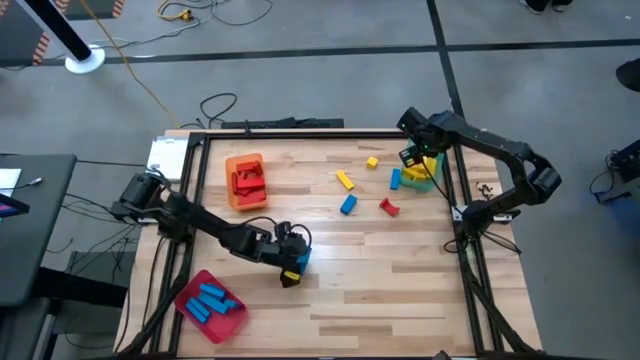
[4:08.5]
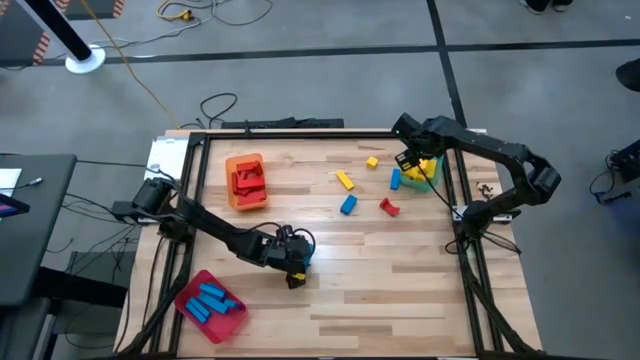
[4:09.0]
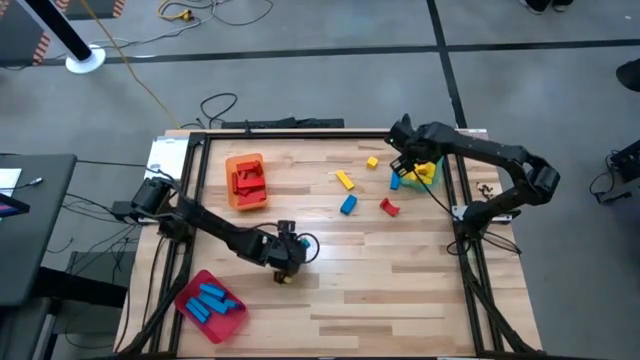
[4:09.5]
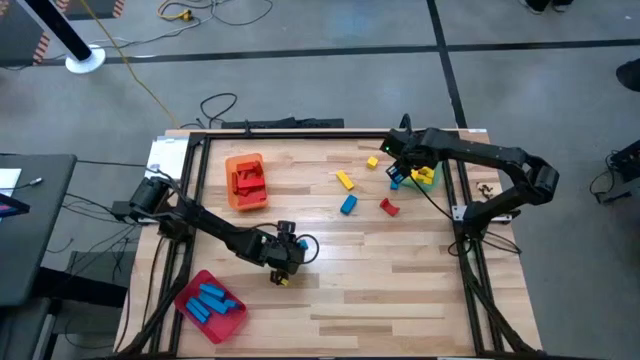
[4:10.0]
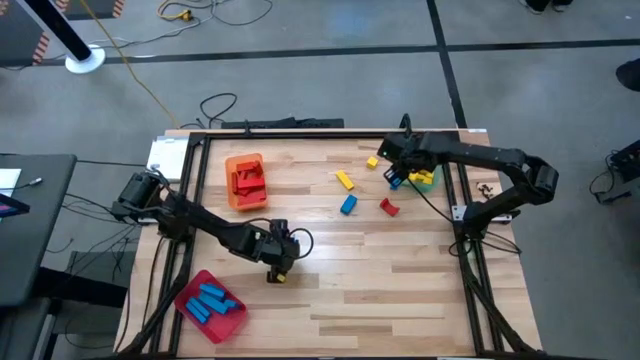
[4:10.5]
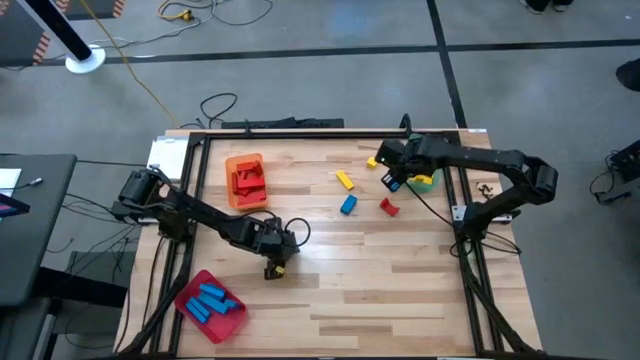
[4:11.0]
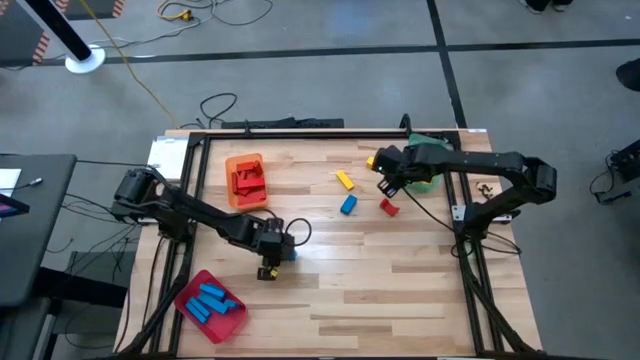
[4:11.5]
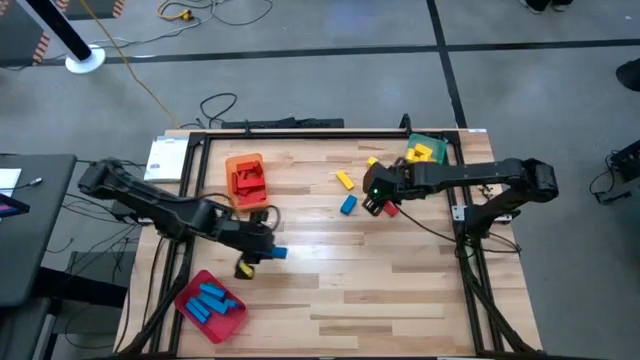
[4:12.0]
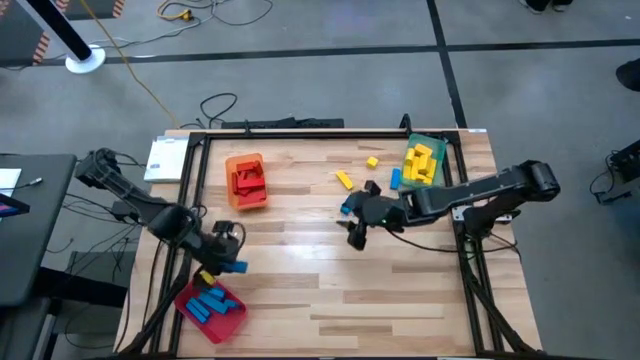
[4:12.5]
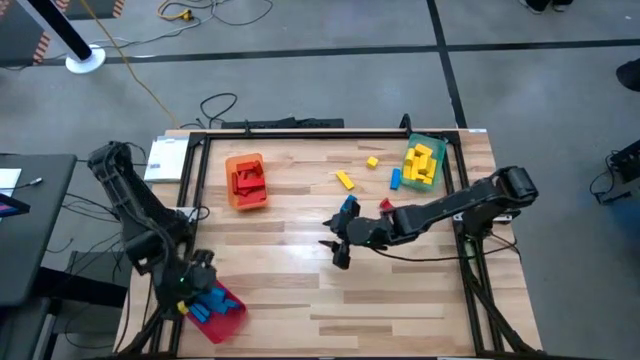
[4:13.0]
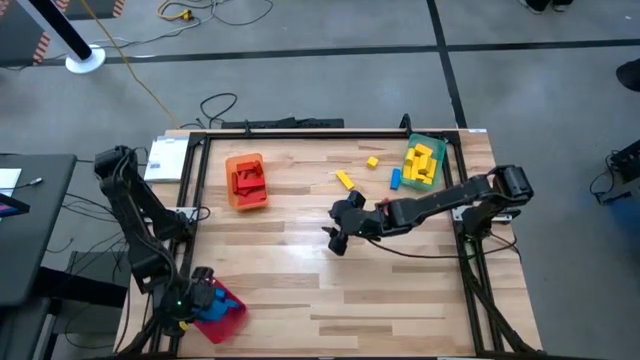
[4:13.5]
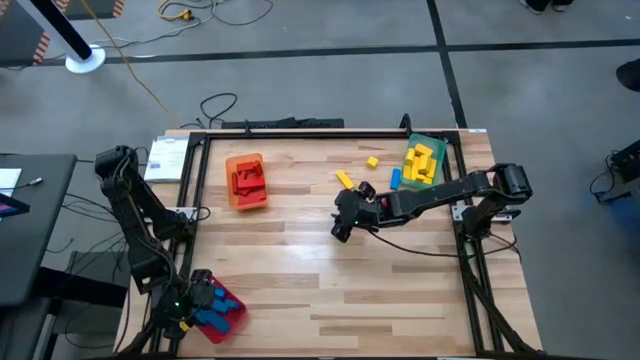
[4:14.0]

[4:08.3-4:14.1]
Task: Sort blocks
Put the blue wooden block into the red bin

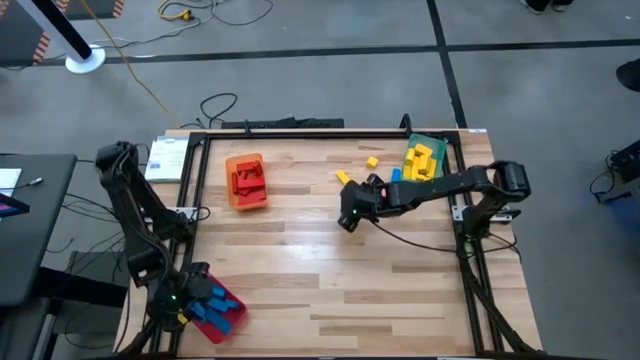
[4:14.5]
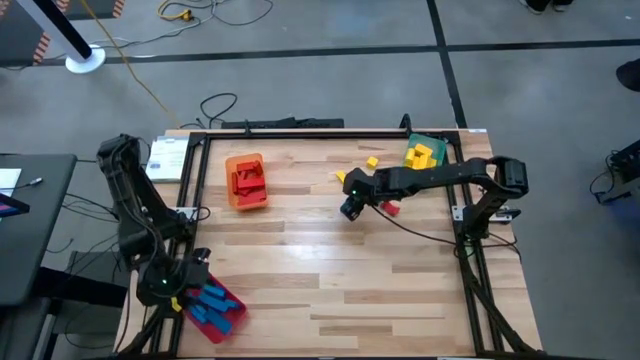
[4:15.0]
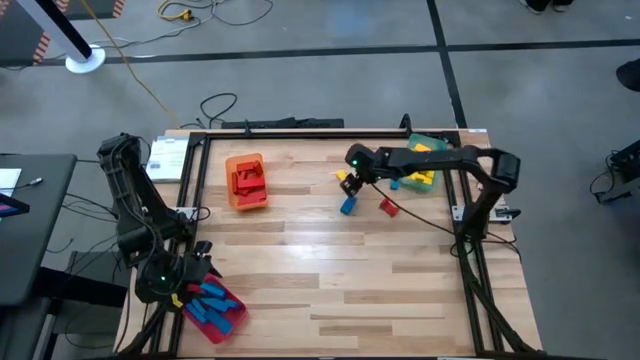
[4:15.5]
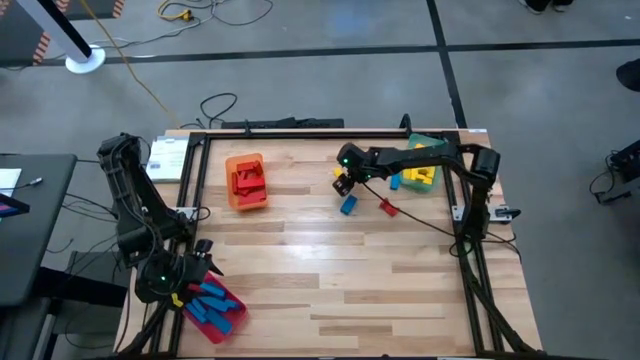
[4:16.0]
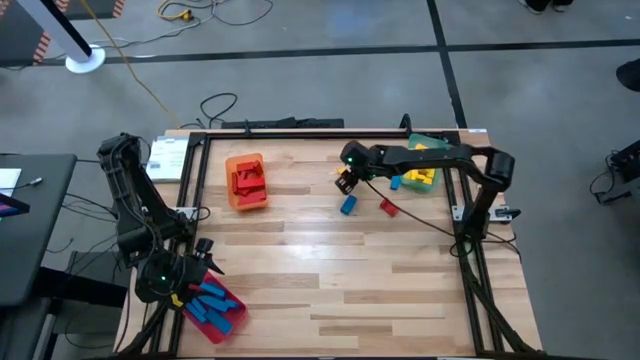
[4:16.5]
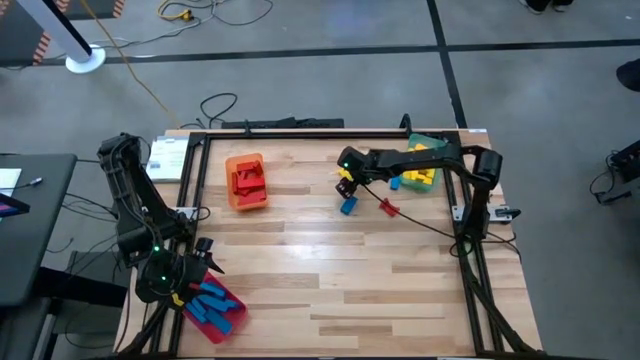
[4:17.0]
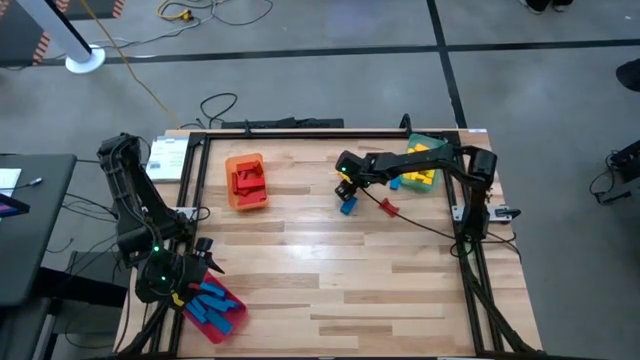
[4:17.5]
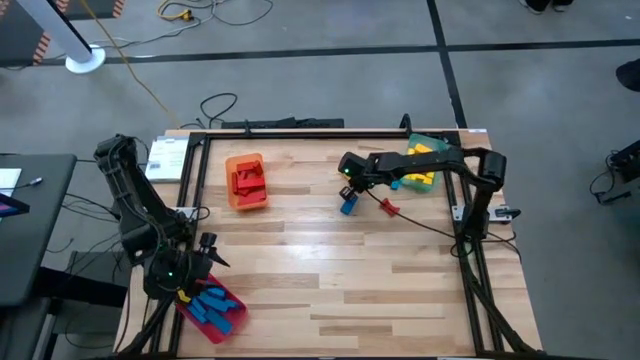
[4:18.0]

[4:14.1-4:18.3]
Put the yellow wooden block into the green bin

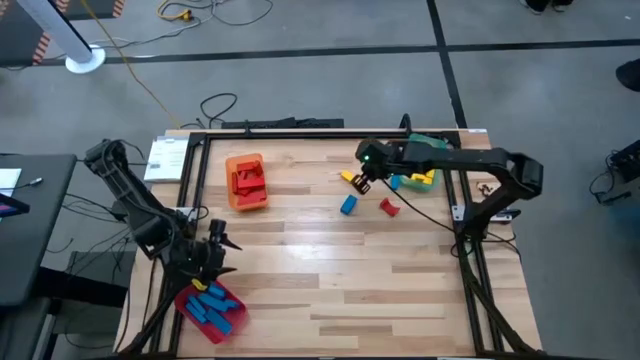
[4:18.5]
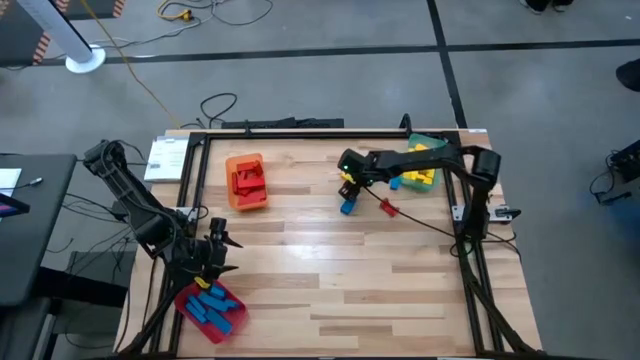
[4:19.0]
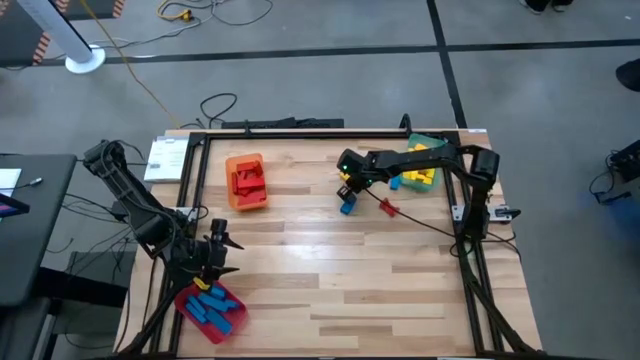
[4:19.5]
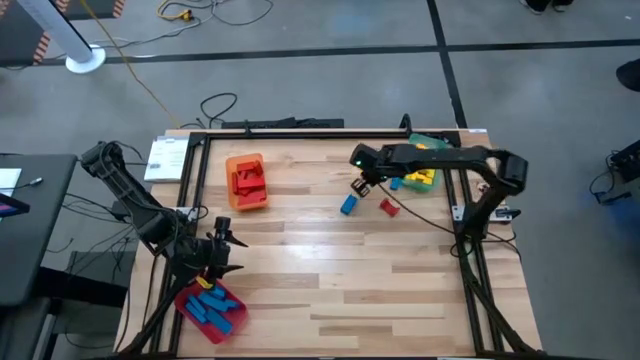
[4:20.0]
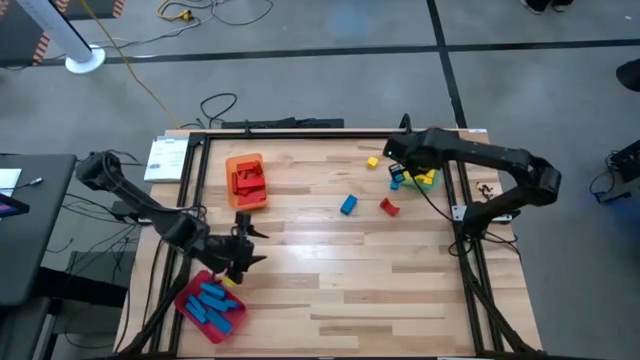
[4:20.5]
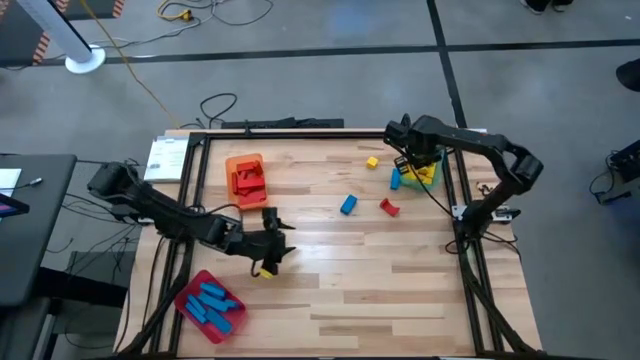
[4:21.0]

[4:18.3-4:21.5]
Put the yellow wooden block into the green bin

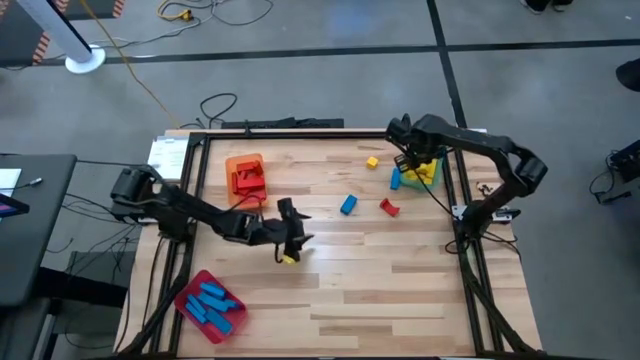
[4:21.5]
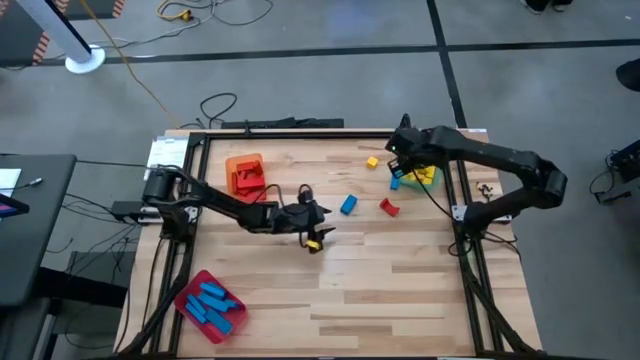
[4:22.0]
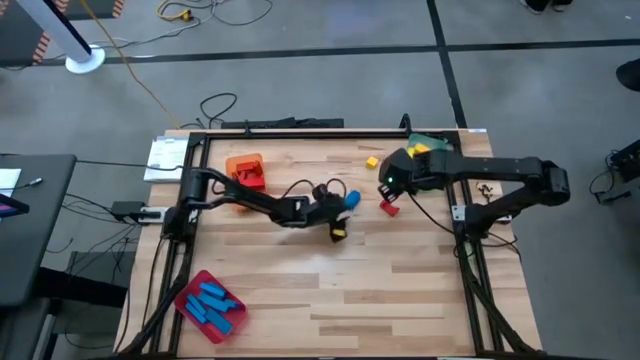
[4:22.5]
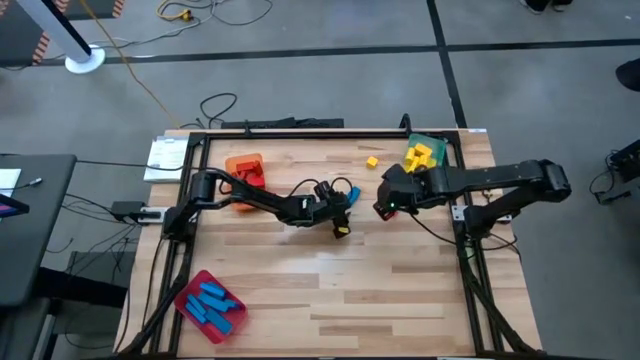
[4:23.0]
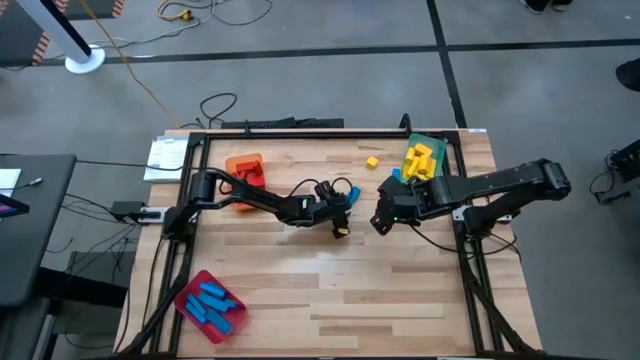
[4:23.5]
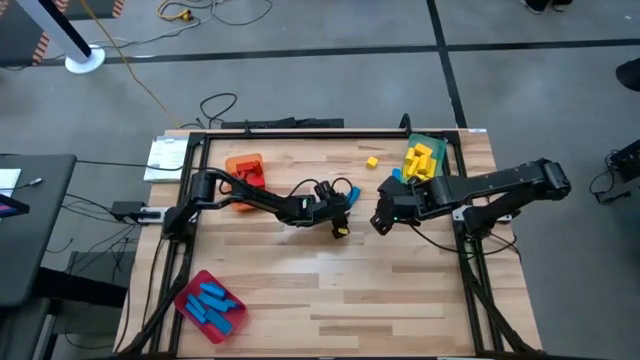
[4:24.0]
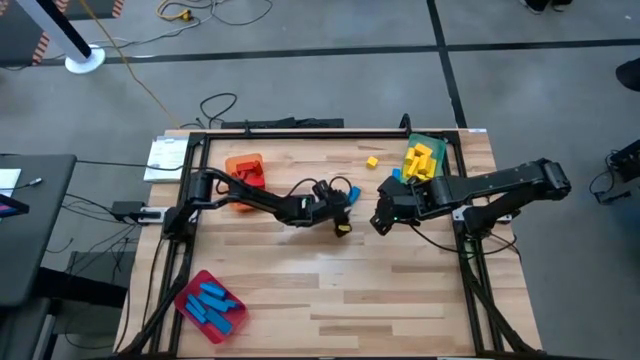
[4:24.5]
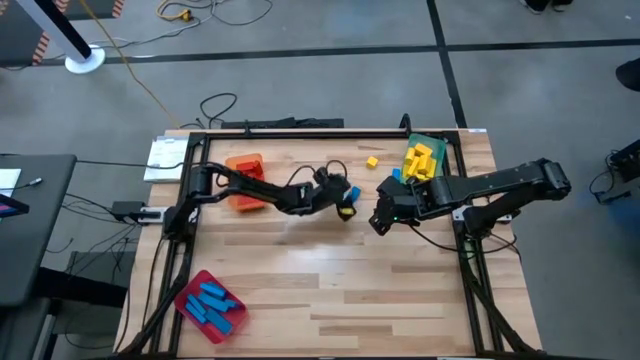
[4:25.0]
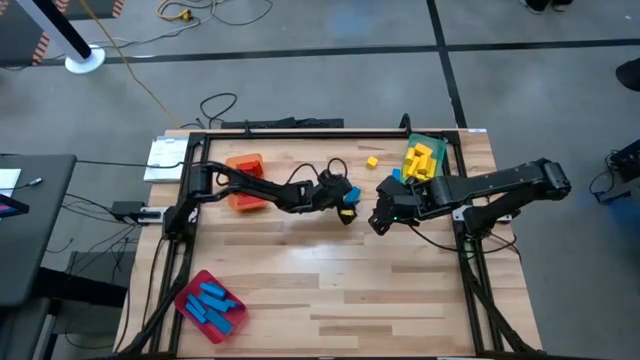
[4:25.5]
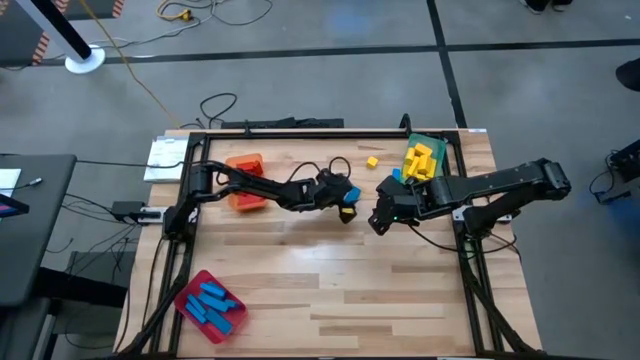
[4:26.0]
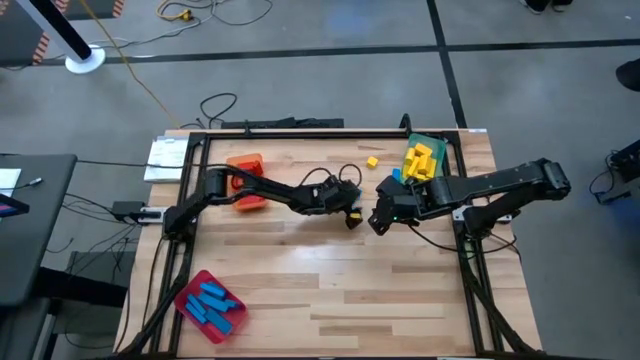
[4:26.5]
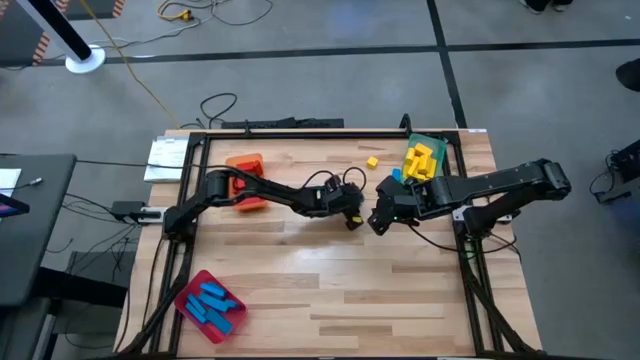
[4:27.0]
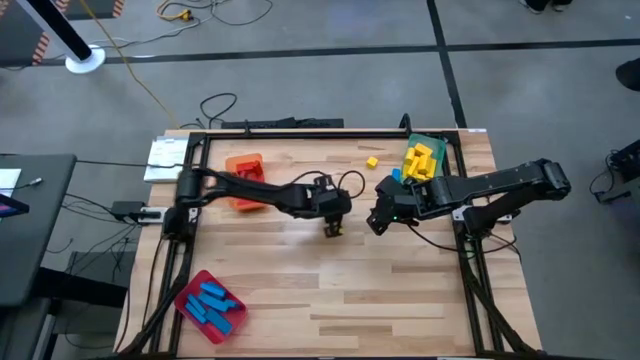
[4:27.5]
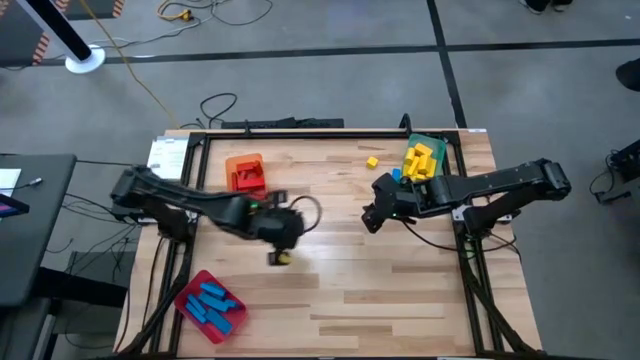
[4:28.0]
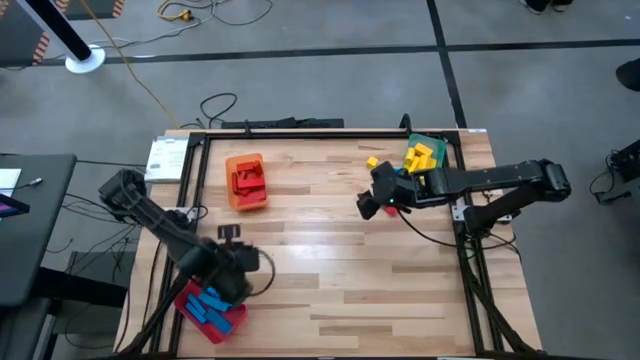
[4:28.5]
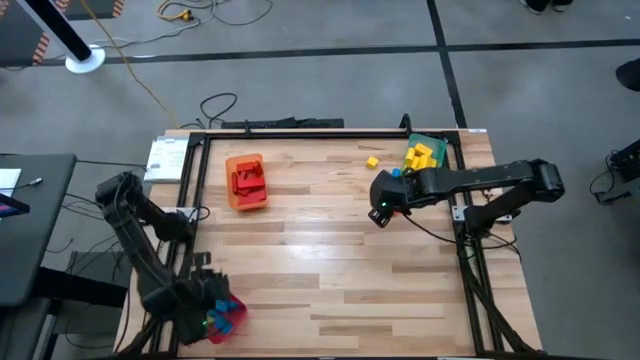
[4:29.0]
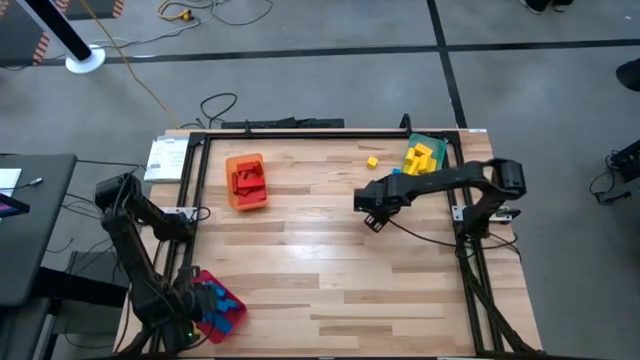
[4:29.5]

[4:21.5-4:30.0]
Put the blue wooden block into the red bin
